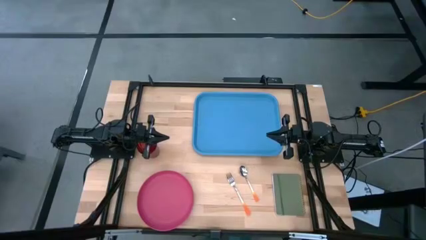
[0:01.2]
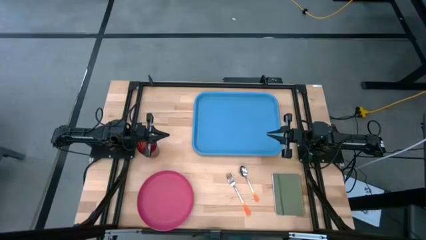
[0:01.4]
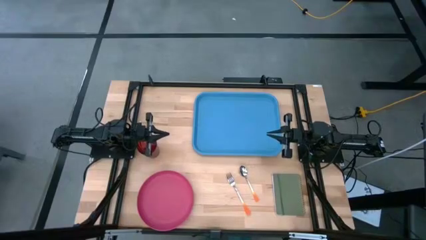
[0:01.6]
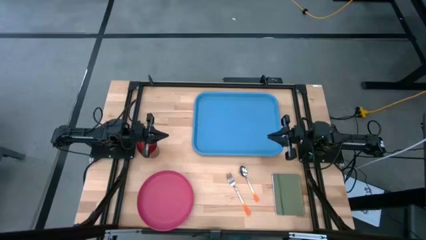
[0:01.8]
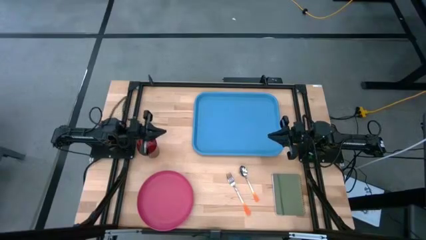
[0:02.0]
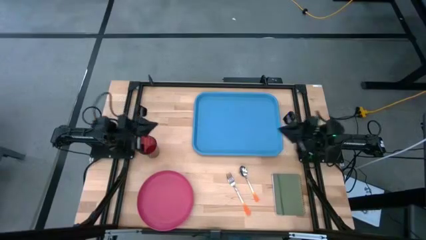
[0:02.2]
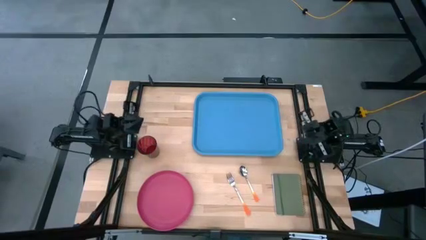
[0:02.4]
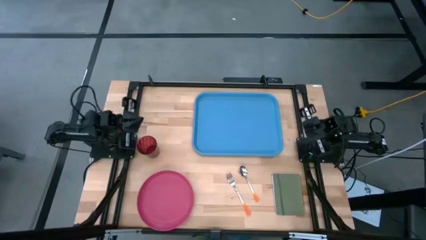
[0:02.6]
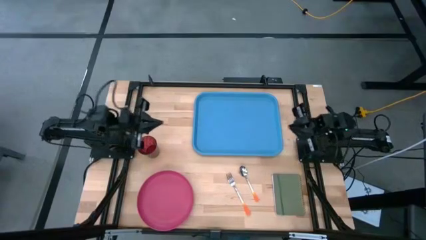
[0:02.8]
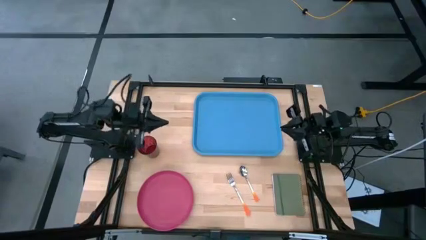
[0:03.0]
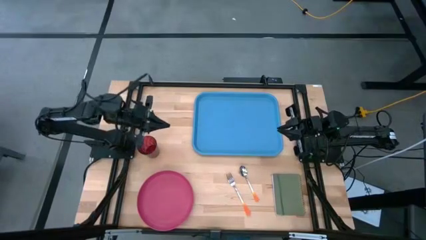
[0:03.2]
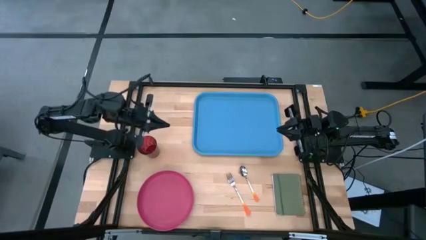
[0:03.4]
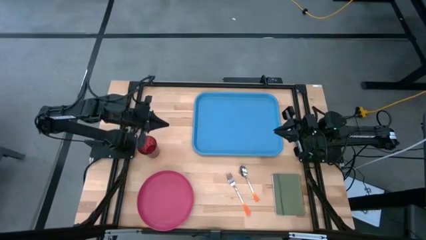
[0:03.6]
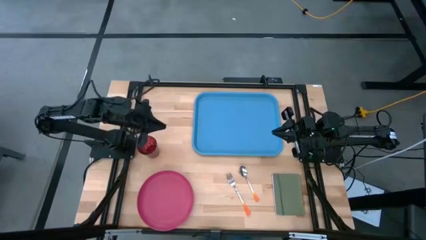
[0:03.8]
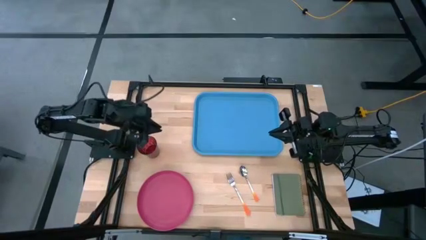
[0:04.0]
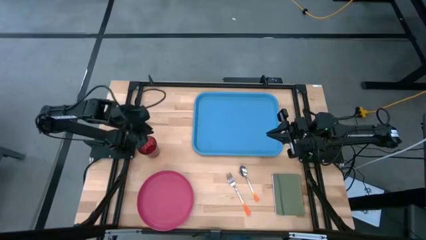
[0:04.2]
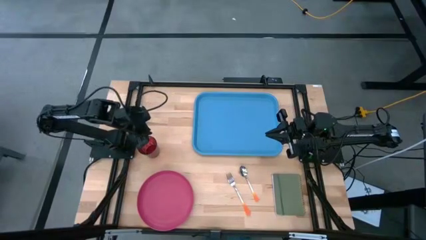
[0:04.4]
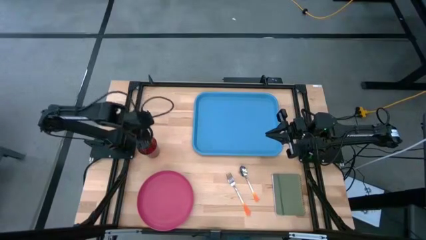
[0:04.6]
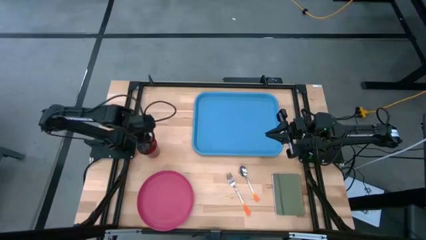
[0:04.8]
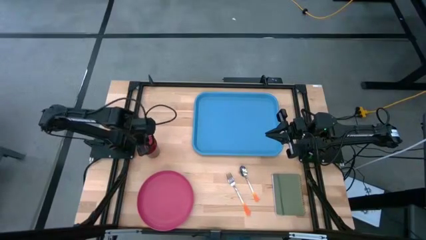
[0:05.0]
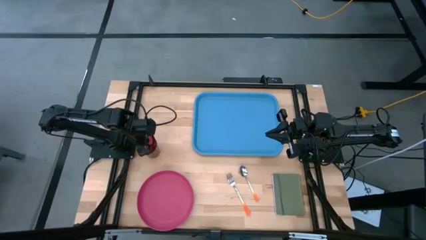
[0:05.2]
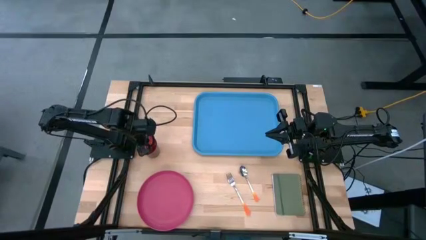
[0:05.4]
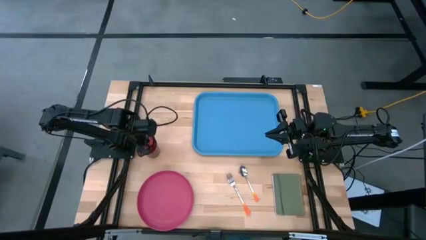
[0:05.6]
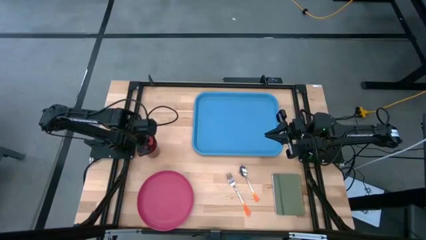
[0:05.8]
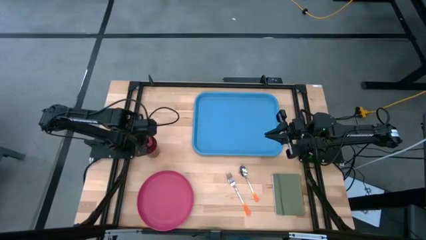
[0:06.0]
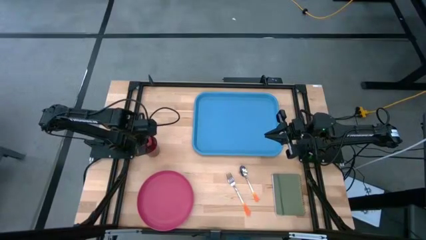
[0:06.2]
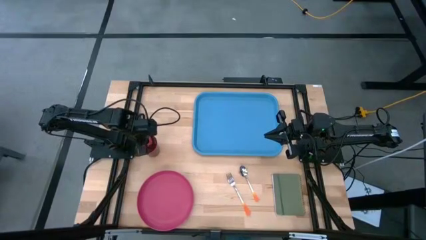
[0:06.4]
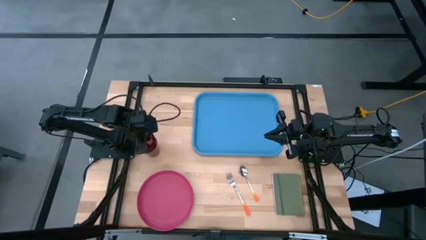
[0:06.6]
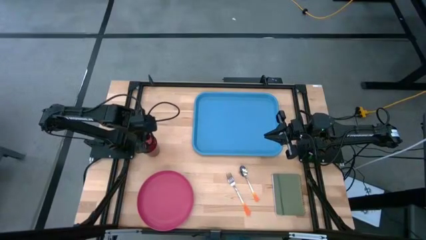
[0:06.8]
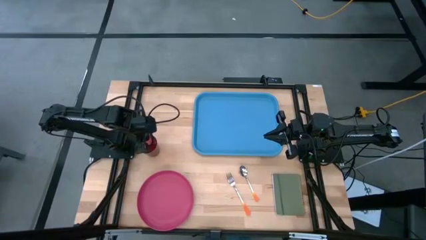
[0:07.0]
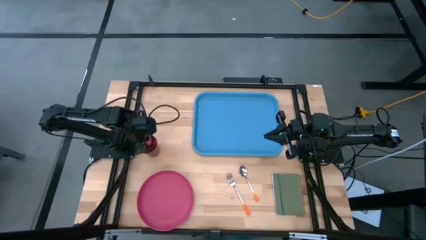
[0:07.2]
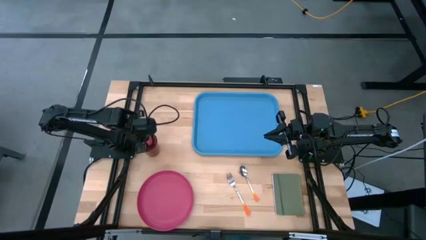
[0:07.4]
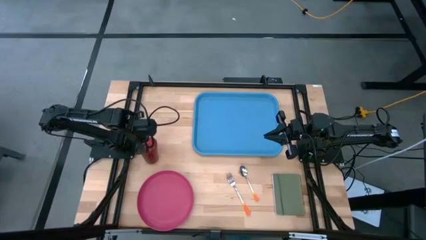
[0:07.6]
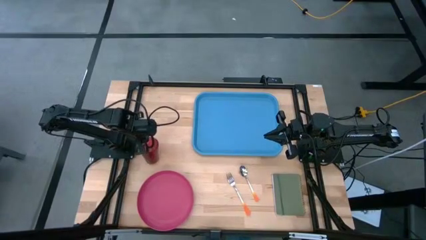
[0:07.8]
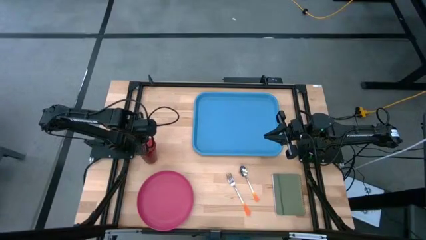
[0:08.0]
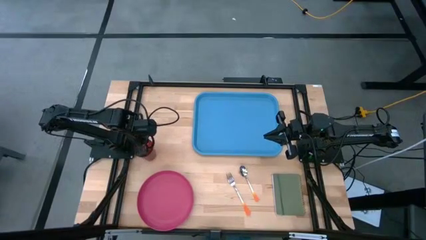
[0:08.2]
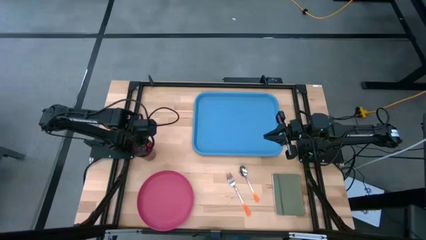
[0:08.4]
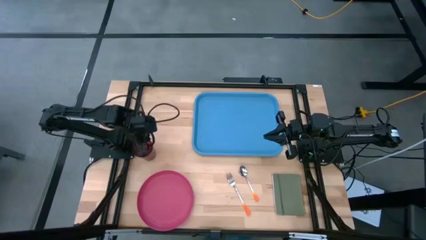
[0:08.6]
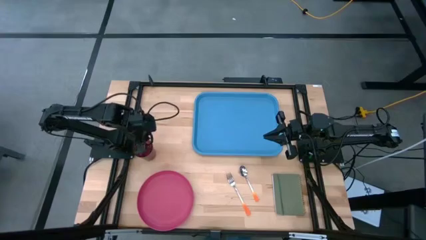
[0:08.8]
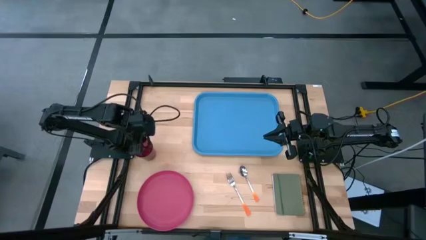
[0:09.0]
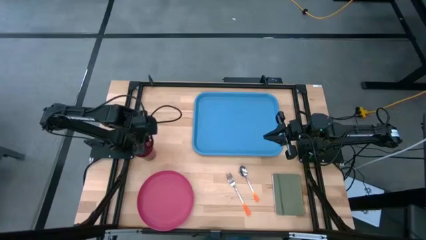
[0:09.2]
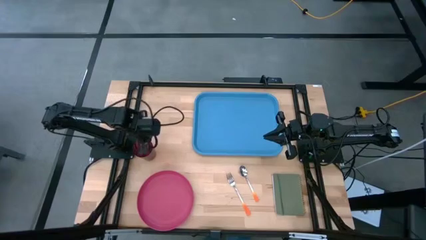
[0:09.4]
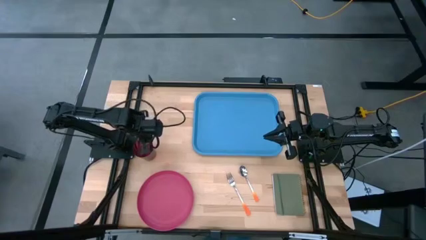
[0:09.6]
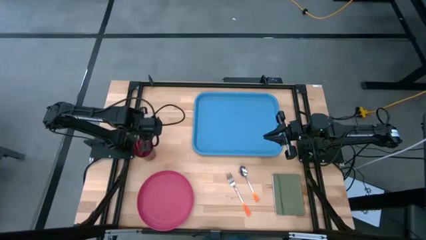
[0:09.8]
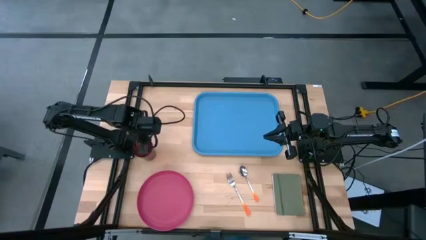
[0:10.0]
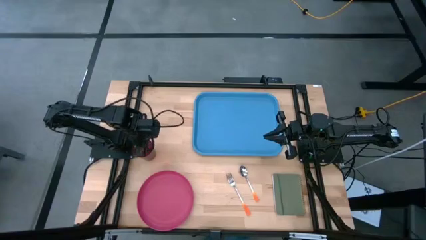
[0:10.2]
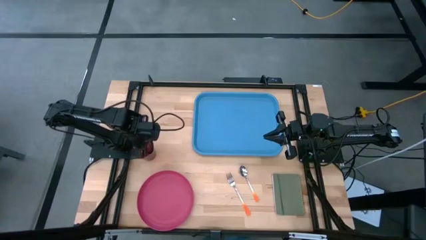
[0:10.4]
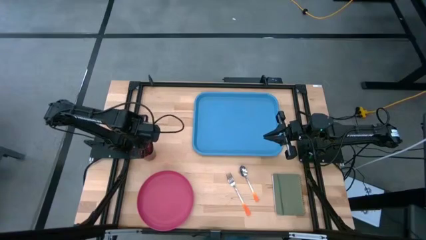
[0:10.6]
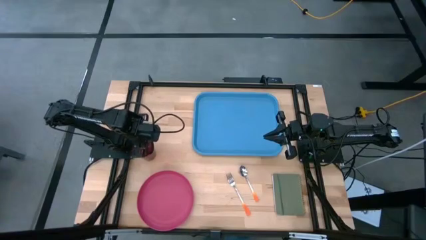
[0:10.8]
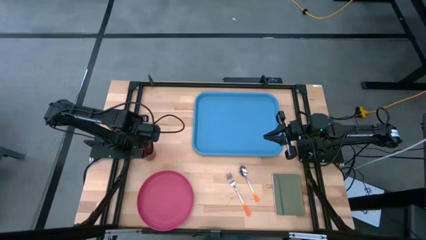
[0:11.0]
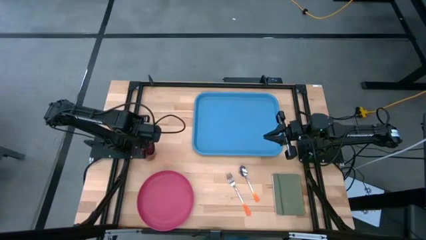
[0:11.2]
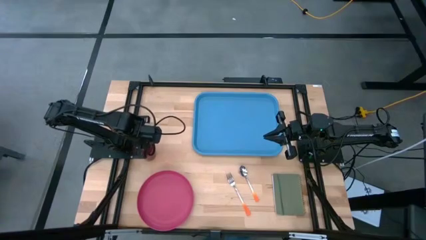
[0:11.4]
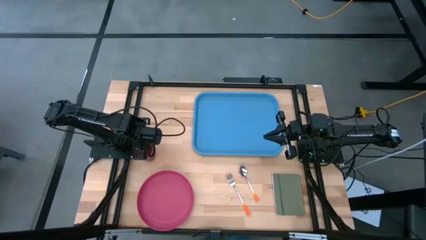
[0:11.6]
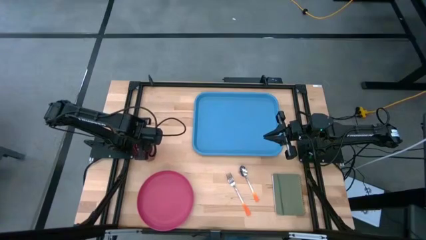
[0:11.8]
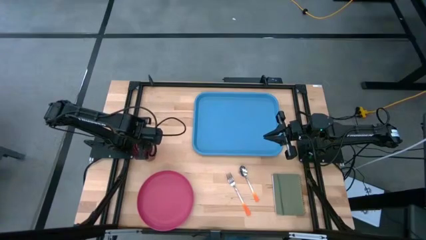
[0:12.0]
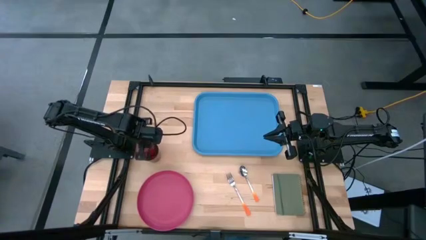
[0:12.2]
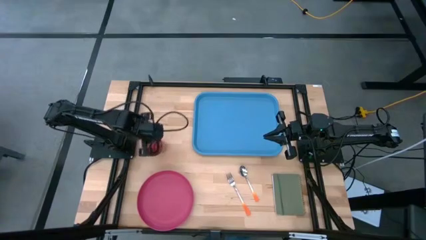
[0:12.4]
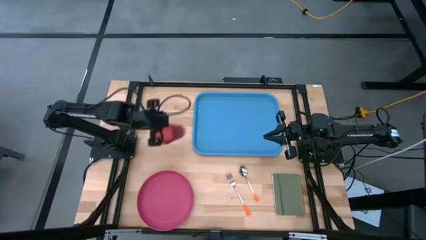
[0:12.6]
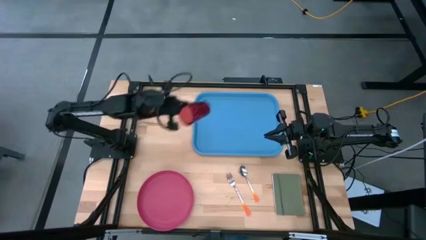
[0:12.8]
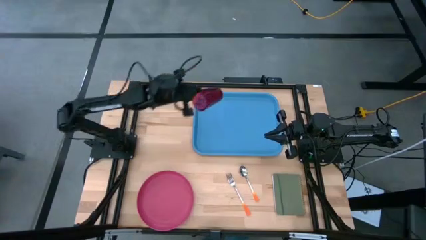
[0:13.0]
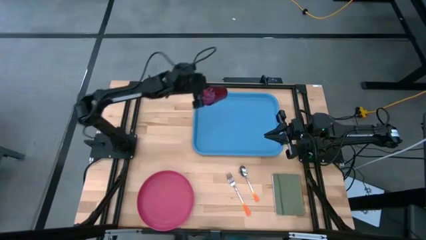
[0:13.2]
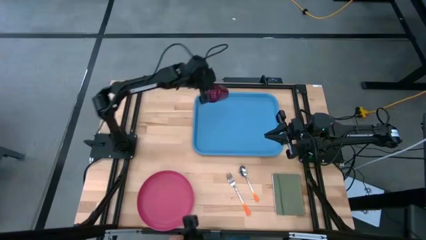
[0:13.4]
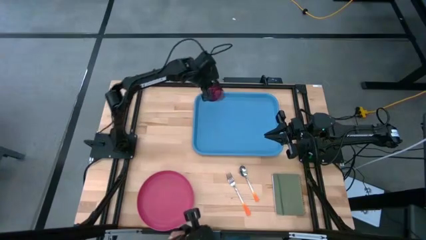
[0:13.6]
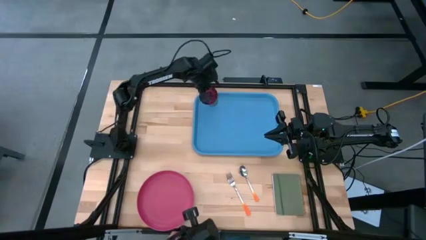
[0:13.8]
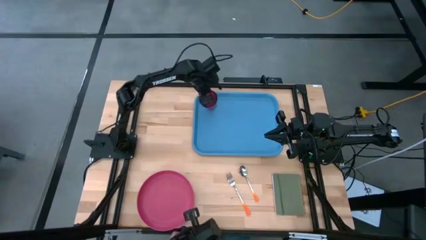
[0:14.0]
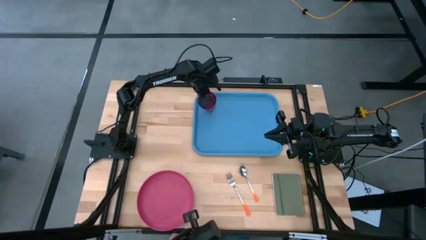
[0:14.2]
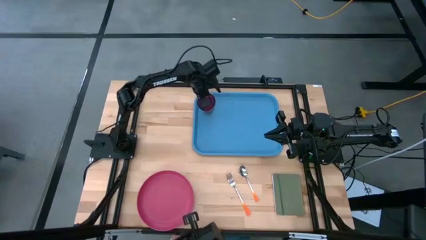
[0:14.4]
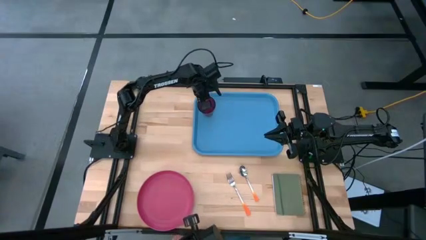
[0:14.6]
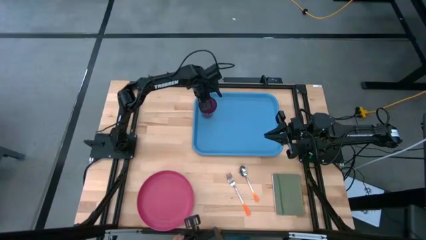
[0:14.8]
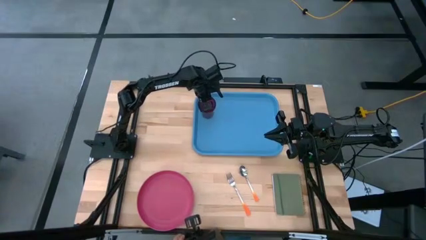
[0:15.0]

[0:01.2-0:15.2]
Task: Pick and place plate/cup/fork/spoon on tray
Put the red cup on the blue tray
